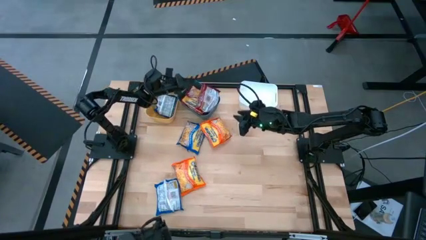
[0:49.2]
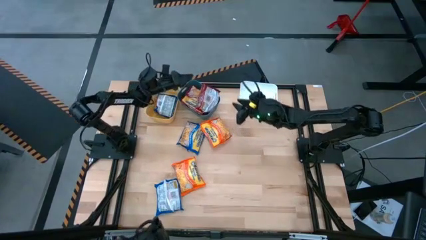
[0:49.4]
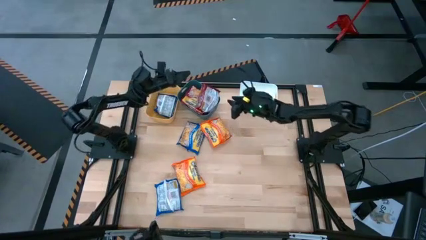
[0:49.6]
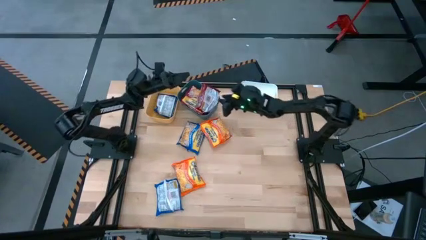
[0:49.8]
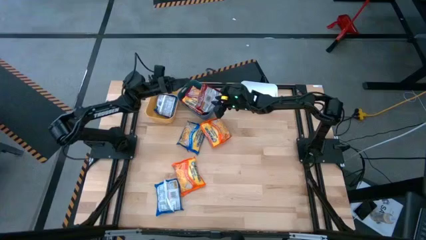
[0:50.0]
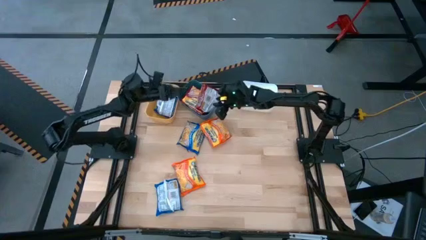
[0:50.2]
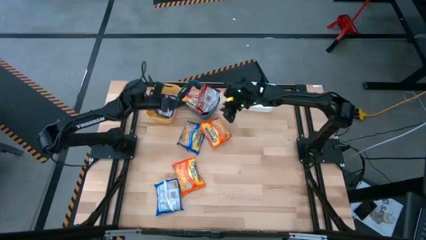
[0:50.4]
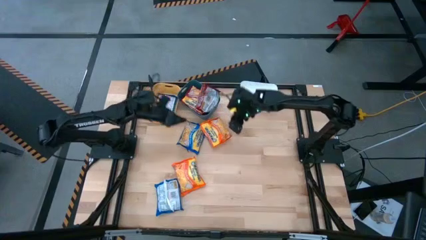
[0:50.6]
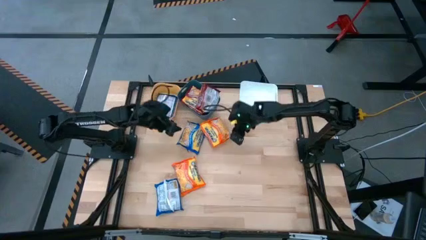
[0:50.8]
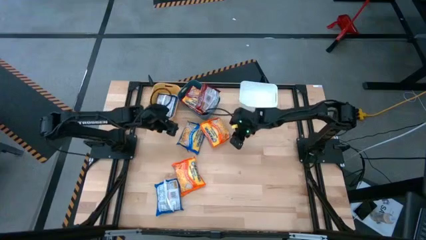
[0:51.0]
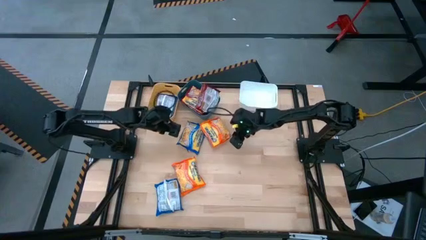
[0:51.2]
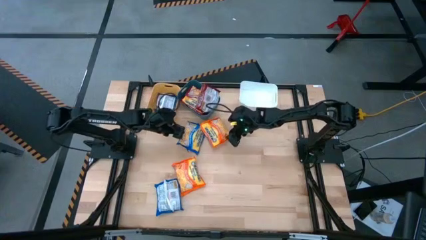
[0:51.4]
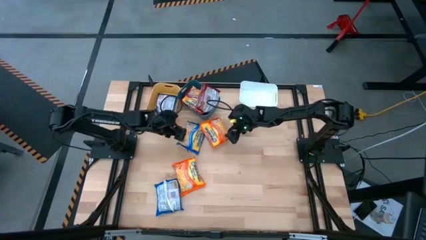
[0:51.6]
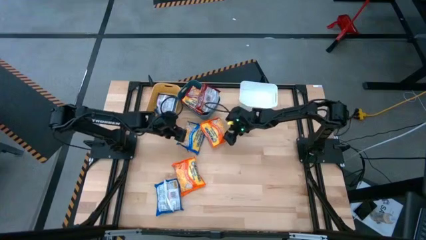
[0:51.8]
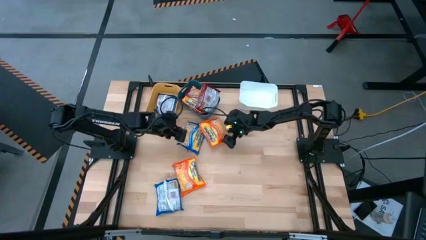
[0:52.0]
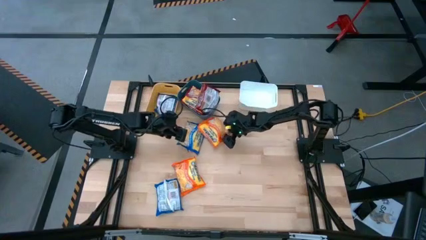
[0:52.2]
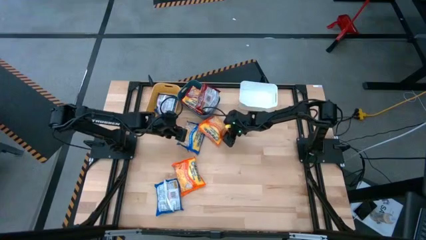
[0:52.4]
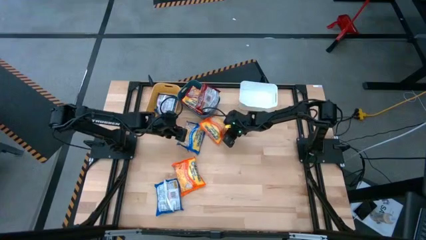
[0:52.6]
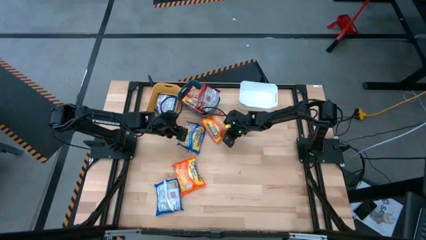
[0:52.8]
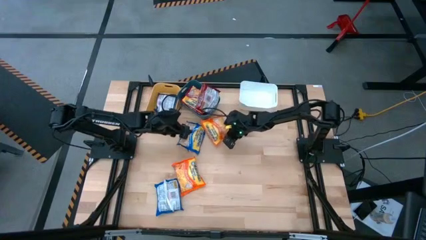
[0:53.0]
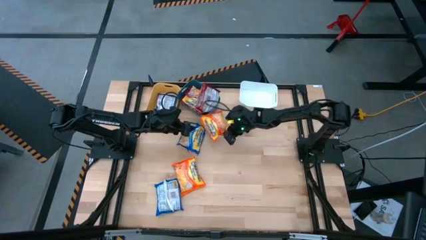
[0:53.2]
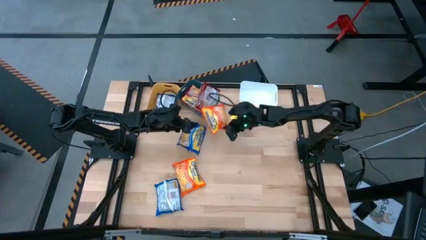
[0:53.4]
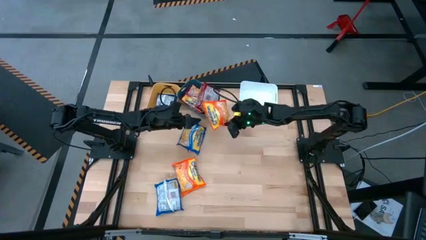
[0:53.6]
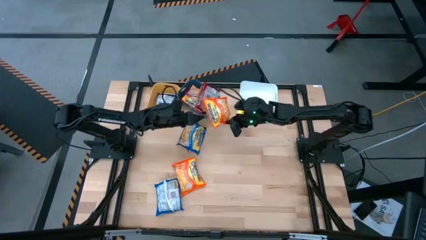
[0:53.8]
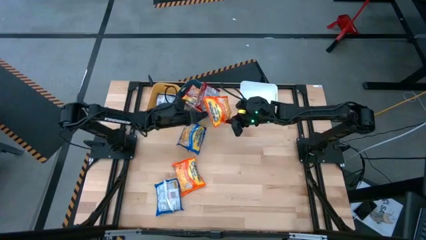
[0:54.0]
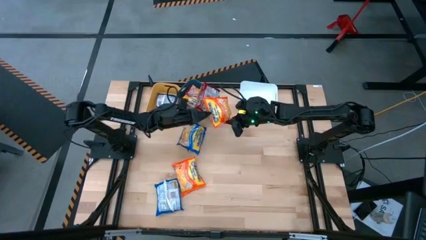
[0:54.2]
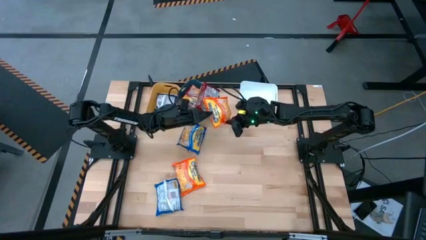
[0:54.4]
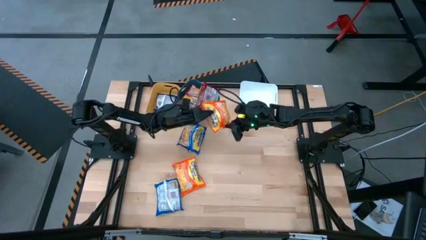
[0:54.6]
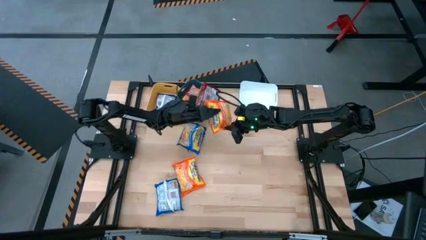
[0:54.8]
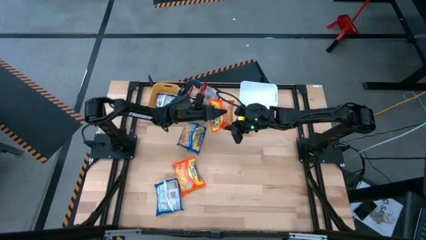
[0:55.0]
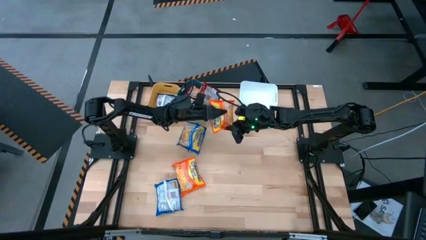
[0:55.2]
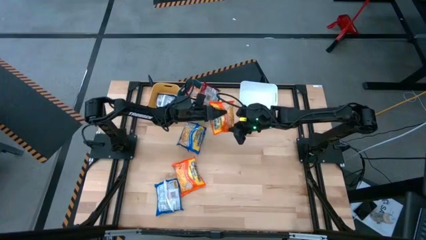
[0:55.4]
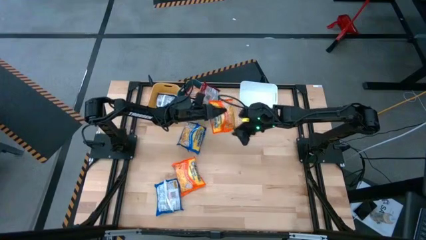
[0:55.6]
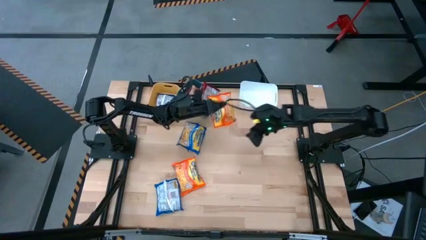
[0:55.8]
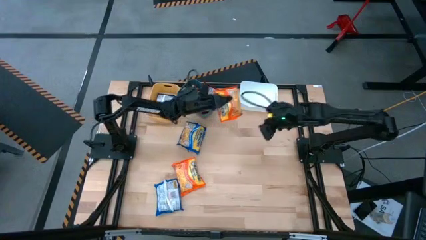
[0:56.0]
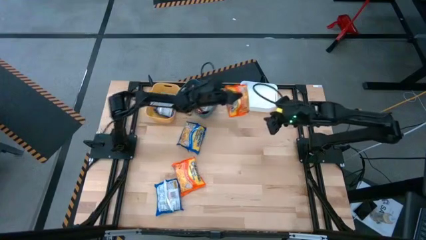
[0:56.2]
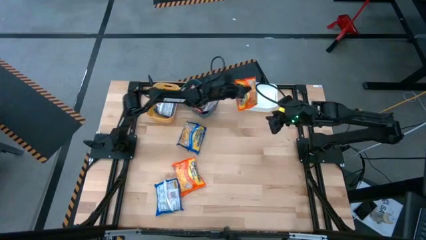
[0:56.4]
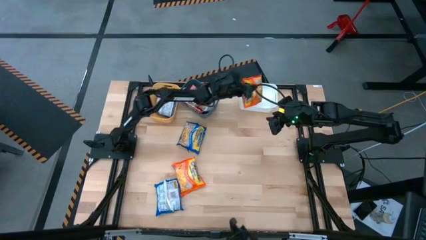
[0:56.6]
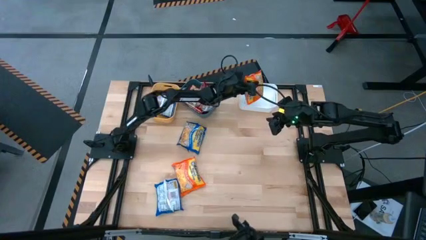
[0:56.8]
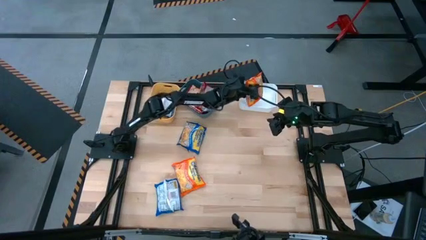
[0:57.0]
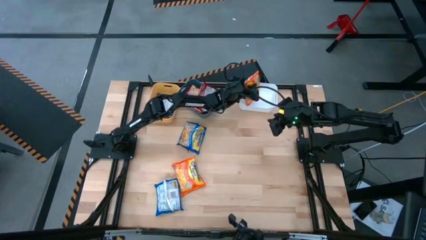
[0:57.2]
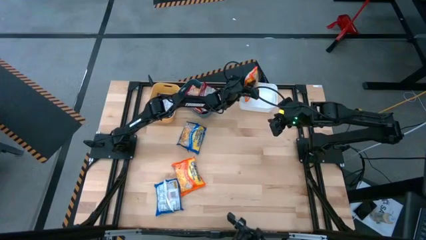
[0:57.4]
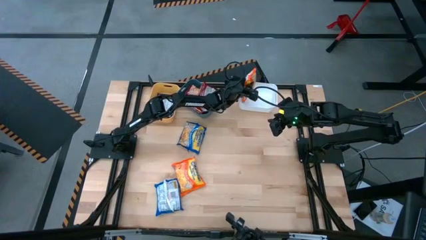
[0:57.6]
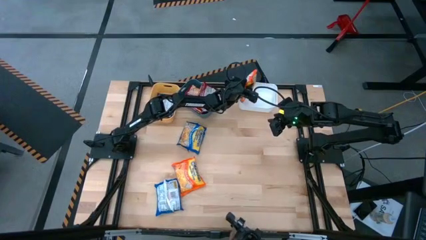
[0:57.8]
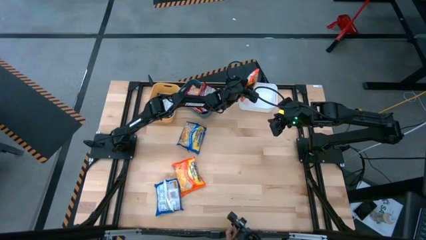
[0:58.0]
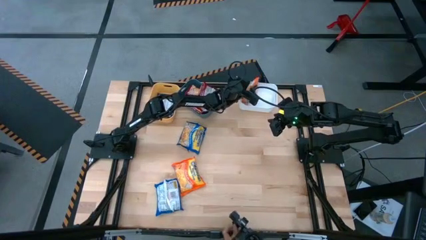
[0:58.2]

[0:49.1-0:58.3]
Task: Sort Maruchan noodles
Put the top orange bag into the white bin

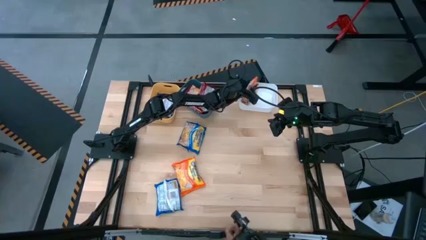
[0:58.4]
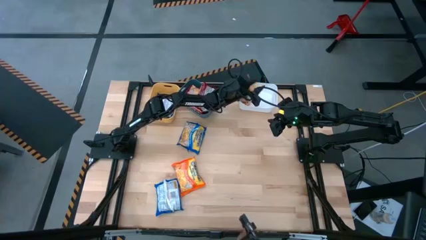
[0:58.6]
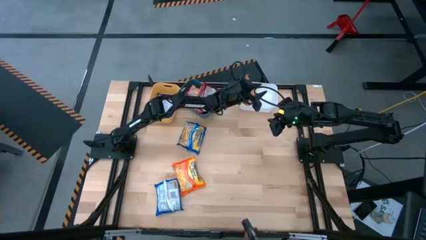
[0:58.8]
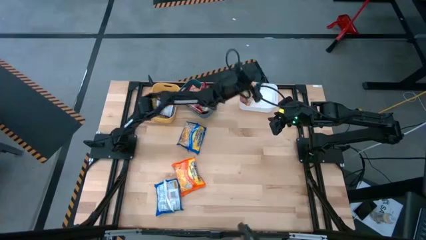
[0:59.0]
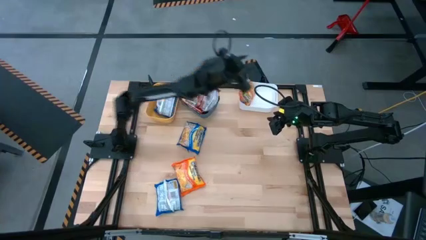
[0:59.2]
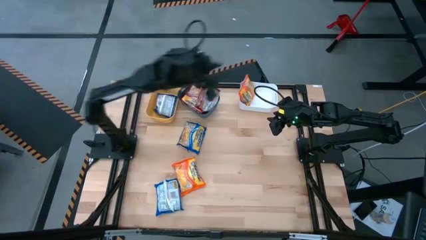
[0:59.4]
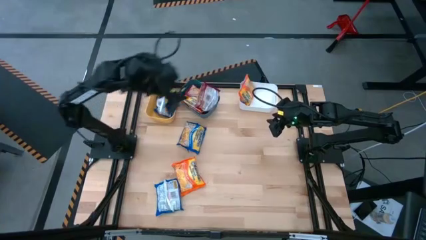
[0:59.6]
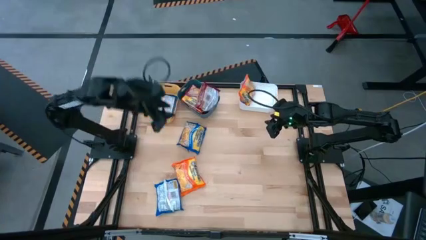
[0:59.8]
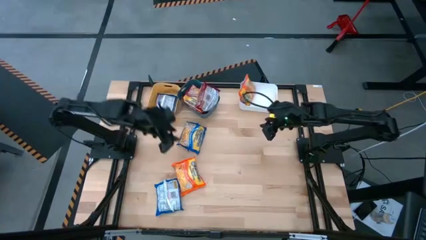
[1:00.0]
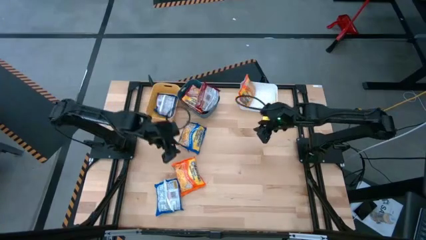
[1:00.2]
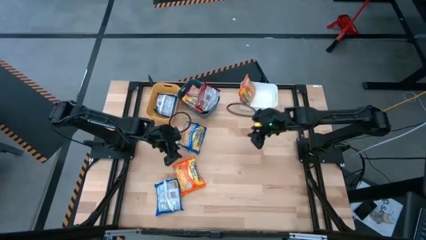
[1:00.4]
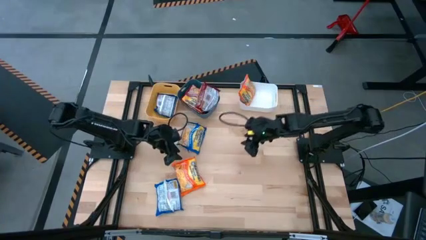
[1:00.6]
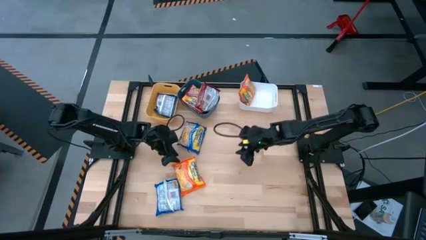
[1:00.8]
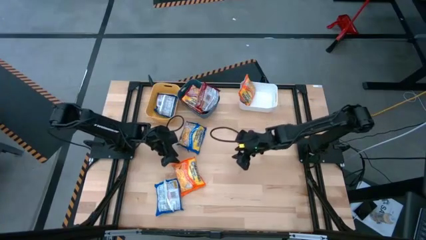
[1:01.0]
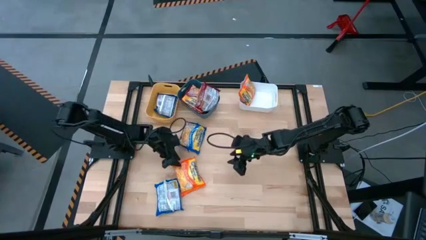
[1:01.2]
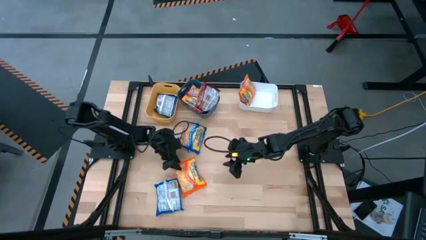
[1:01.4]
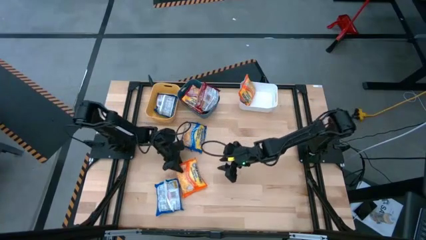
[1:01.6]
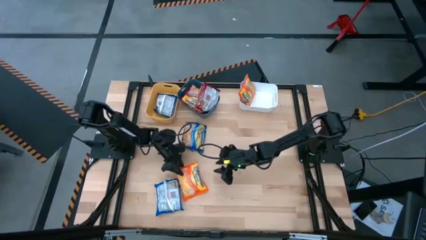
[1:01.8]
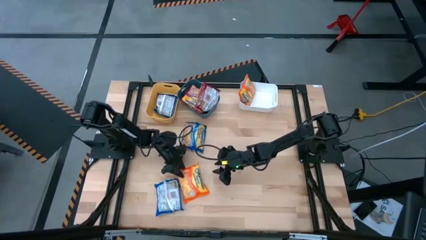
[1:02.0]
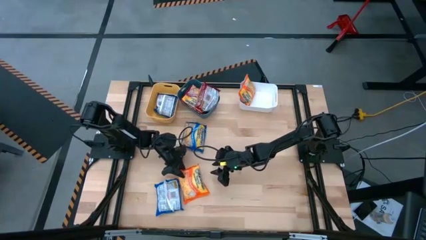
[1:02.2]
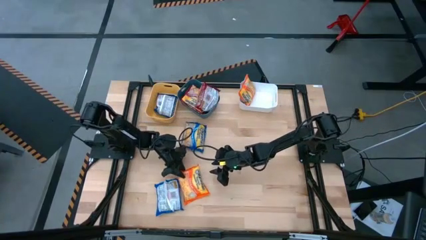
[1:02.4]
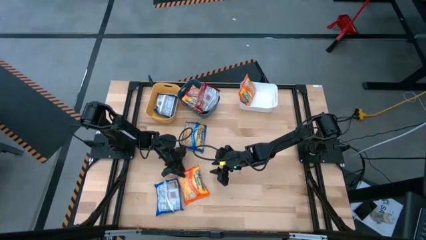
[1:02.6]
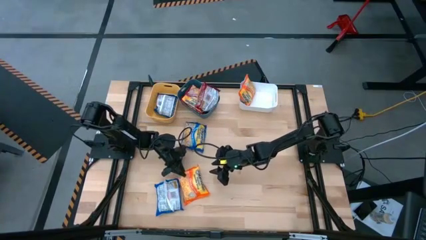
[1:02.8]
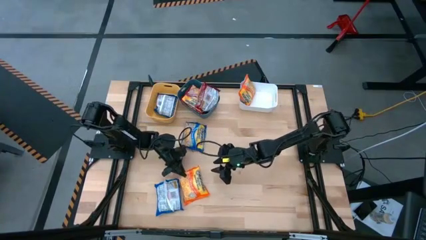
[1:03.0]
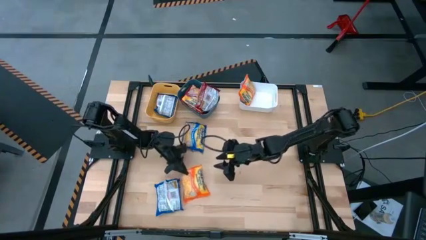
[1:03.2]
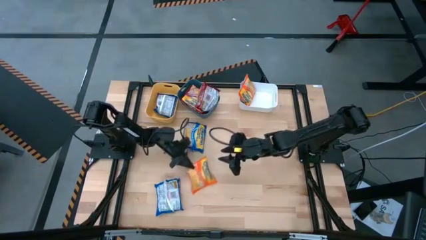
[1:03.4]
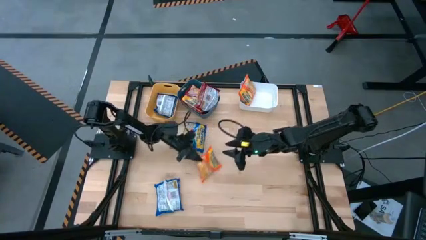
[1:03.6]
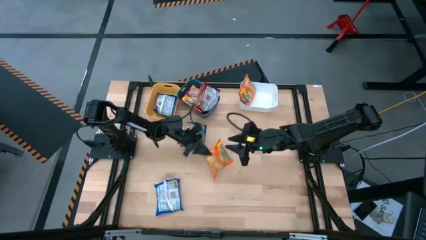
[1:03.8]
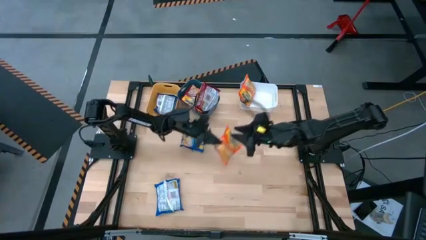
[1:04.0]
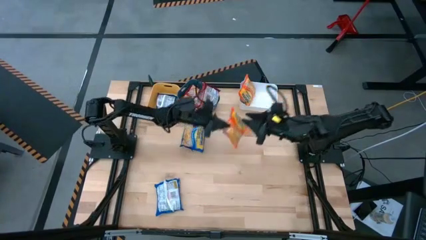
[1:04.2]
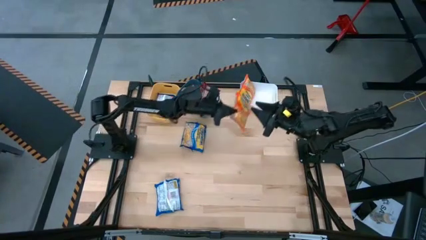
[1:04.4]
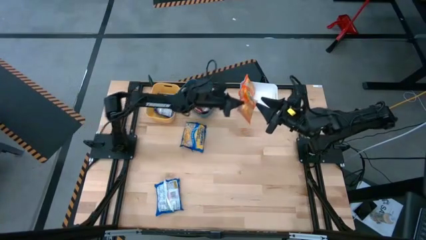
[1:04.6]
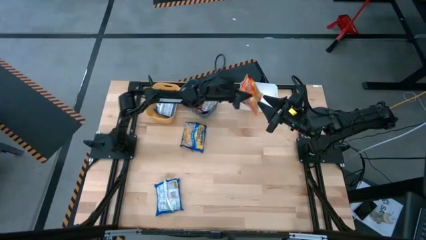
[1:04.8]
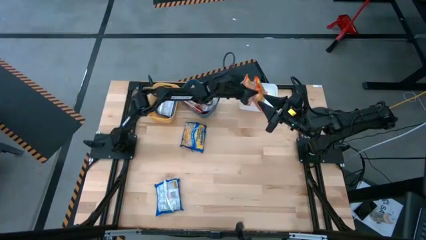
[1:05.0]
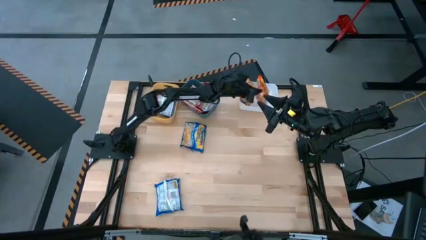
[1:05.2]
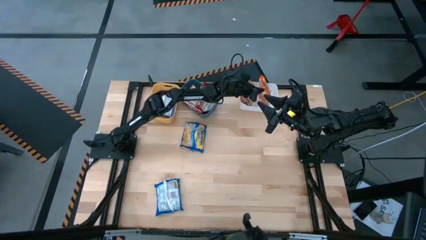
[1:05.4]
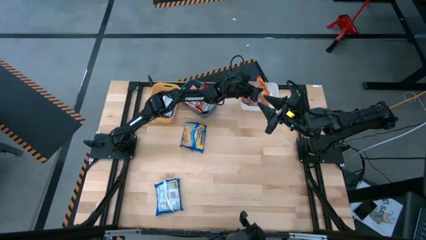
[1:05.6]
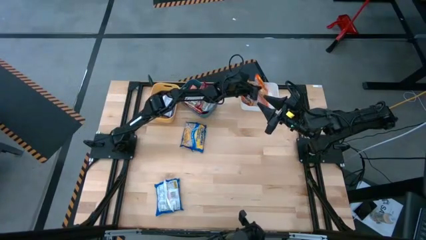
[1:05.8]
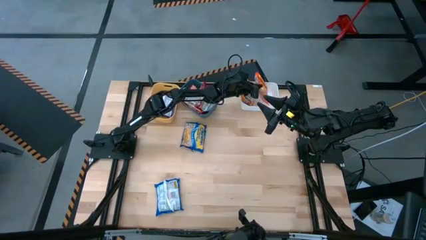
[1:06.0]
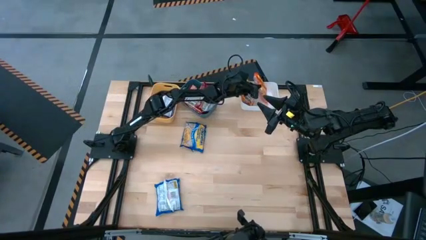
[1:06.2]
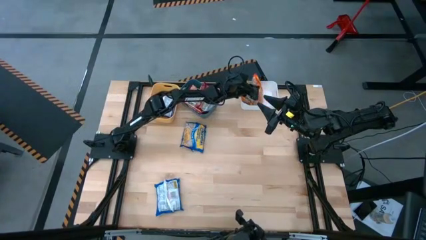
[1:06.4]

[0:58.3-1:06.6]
Put the orange bag into the white bin
